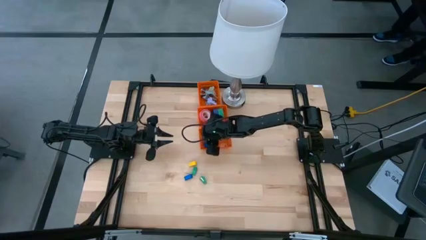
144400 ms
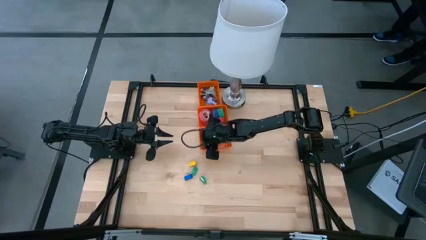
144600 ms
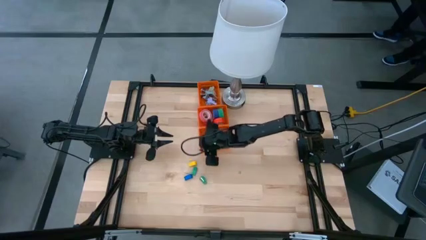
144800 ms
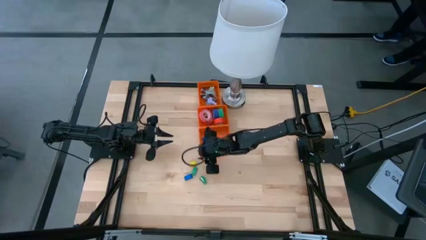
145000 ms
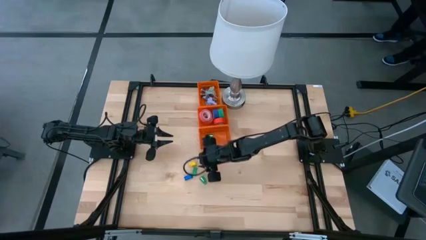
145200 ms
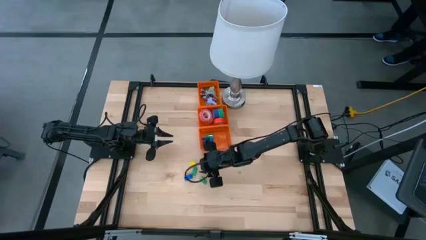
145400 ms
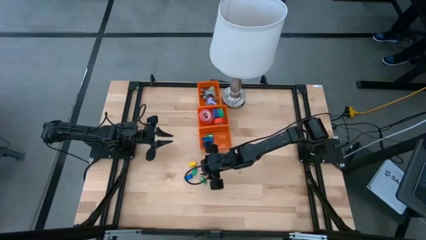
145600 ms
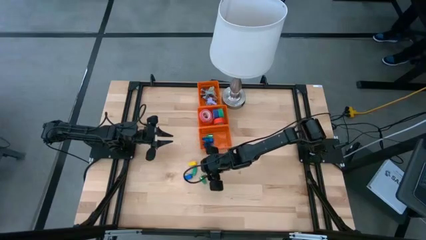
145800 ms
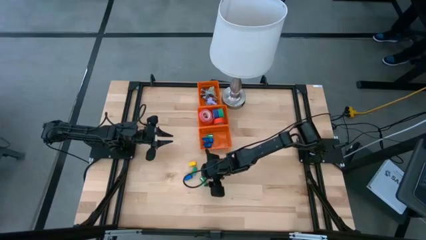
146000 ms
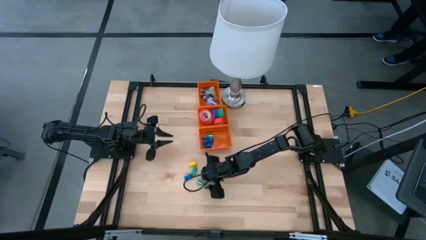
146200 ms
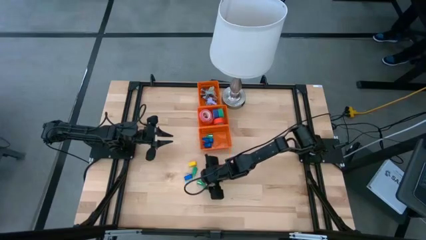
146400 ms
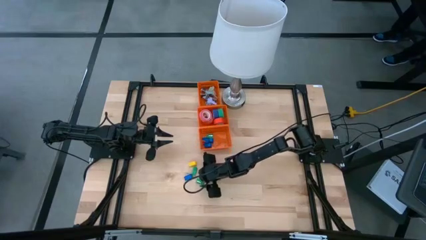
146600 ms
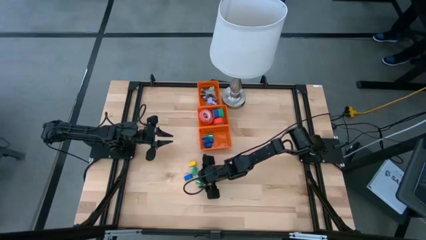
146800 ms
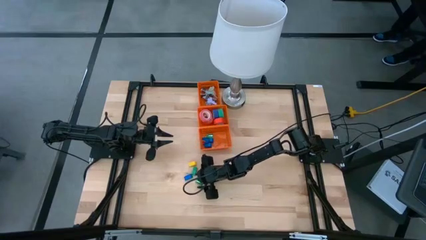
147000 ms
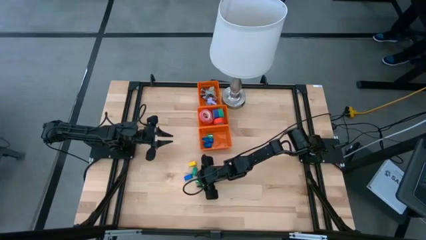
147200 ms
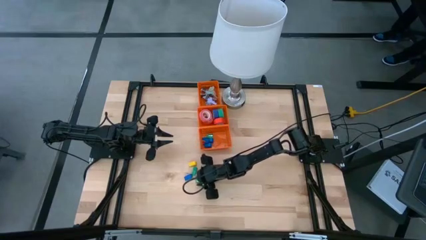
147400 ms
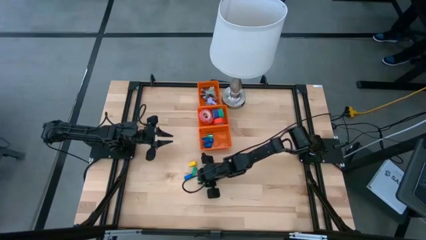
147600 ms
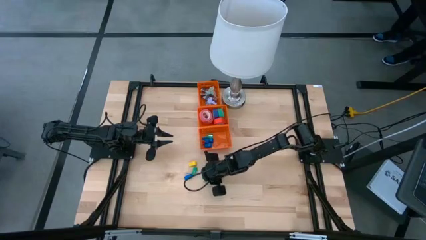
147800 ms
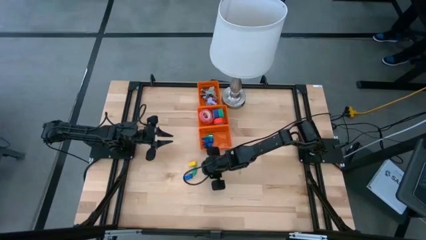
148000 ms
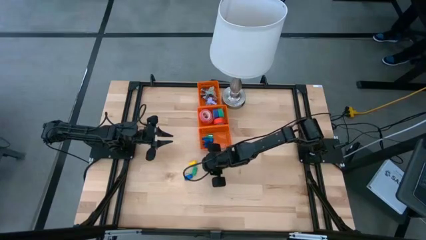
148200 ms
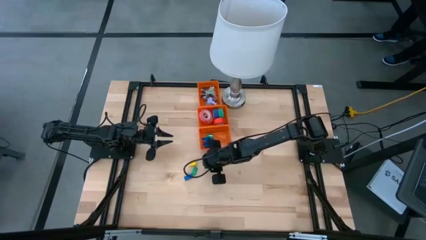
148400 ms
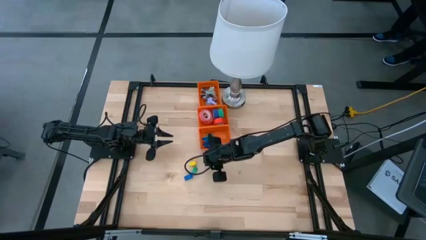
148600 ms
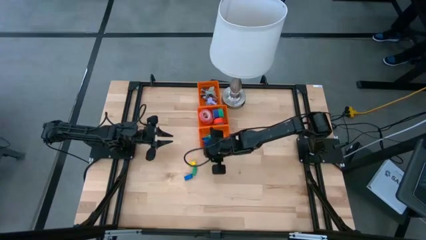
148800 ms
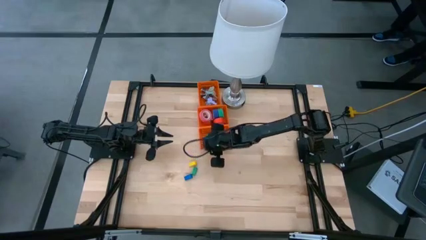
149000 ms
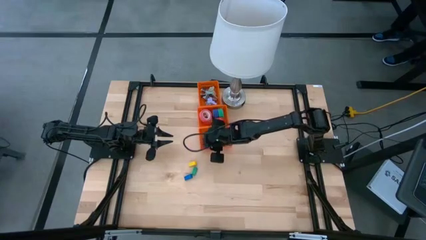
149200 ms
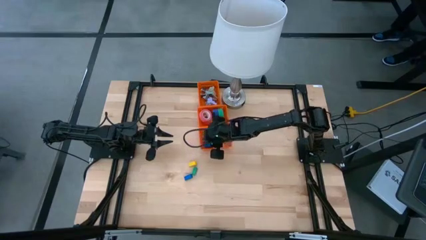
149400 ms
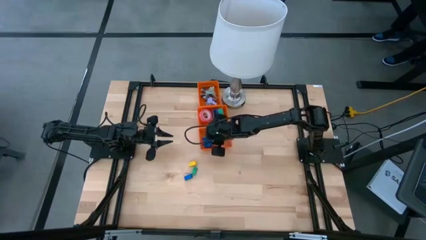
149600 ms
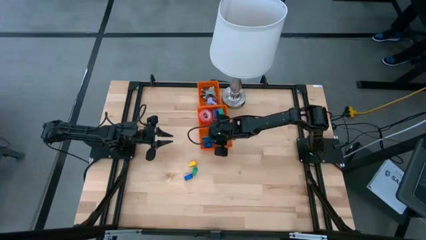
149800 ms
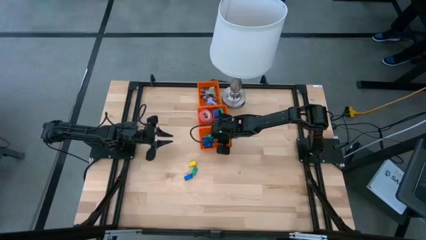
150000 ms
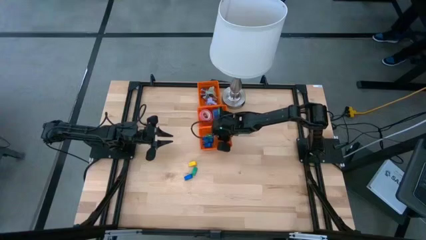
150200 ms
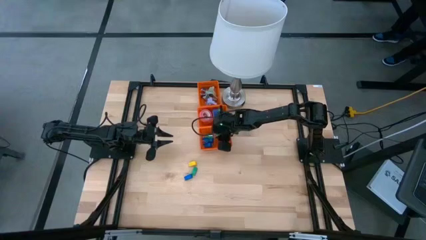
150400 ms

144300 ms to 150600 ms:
Task: Pick and place Stapler, Stapler remover, tape
Put the green stapler into the bottom orange basket

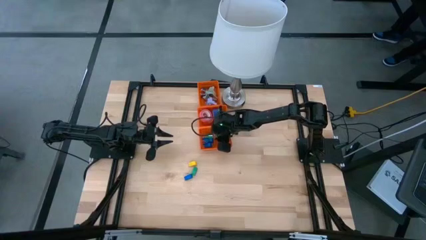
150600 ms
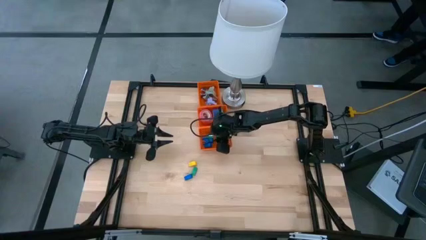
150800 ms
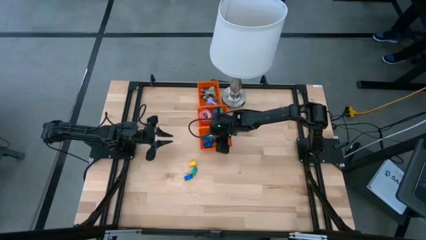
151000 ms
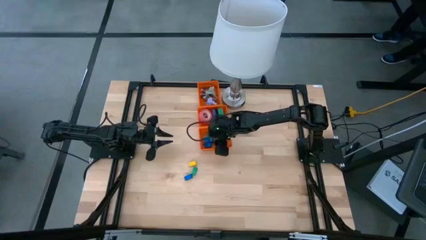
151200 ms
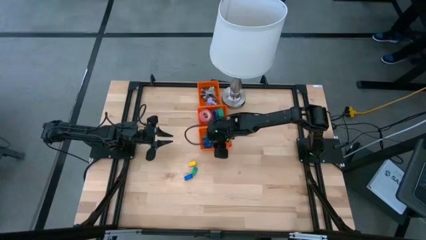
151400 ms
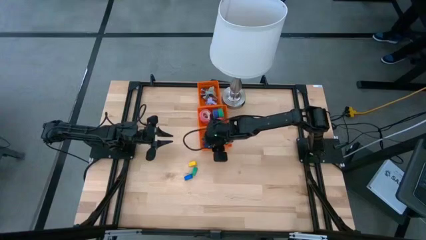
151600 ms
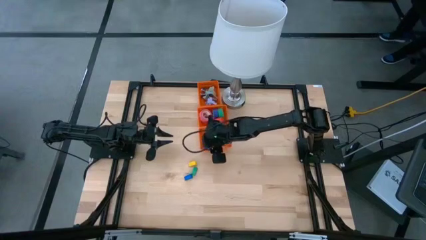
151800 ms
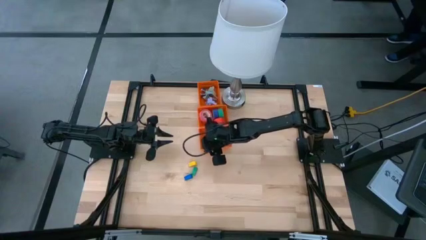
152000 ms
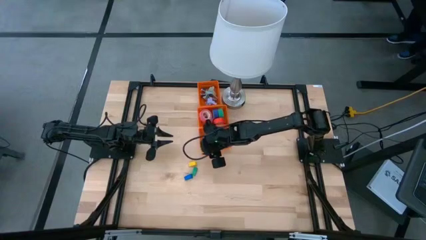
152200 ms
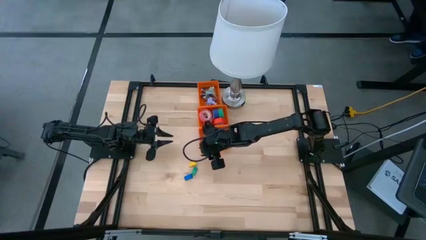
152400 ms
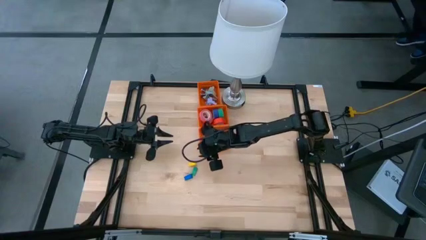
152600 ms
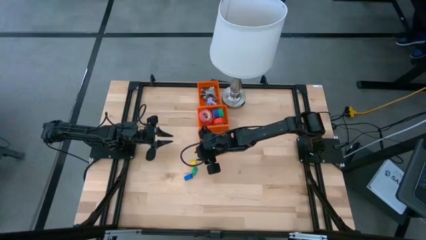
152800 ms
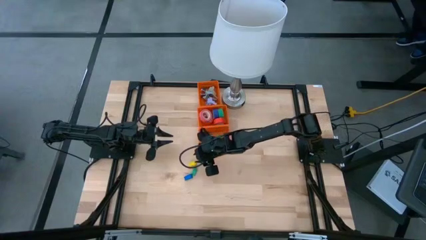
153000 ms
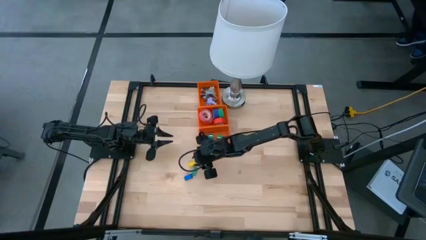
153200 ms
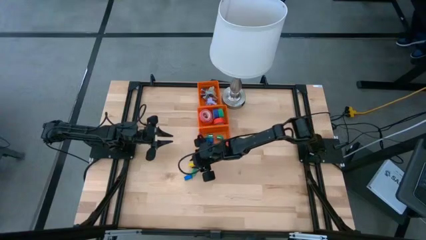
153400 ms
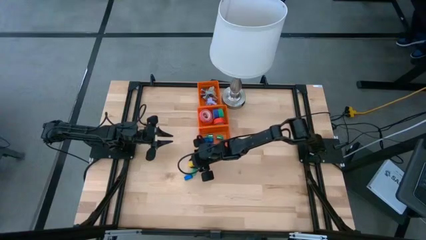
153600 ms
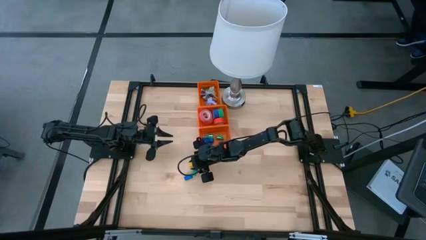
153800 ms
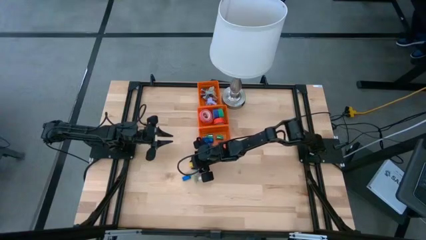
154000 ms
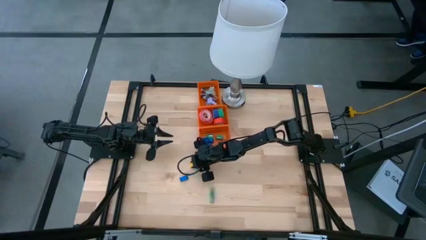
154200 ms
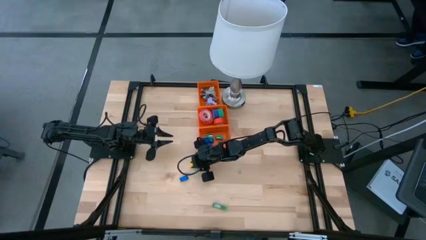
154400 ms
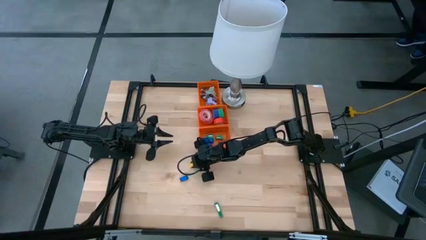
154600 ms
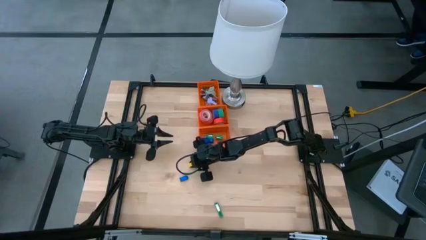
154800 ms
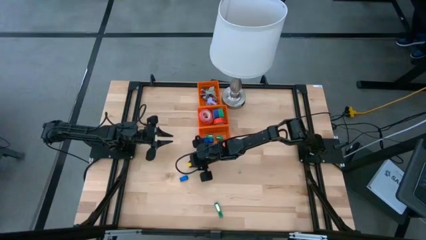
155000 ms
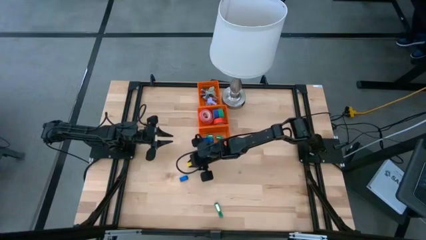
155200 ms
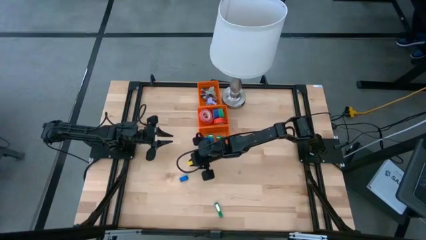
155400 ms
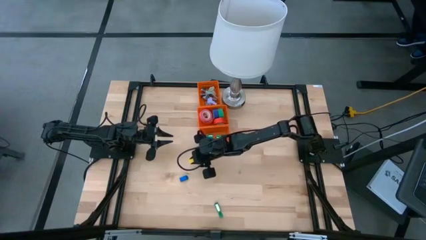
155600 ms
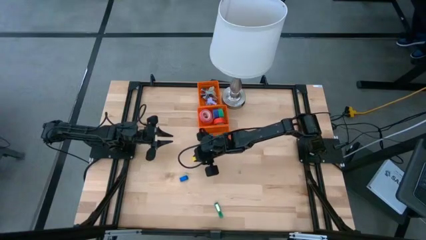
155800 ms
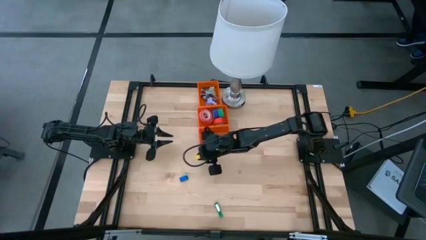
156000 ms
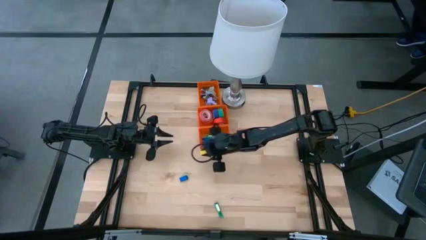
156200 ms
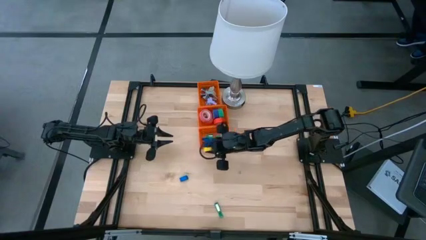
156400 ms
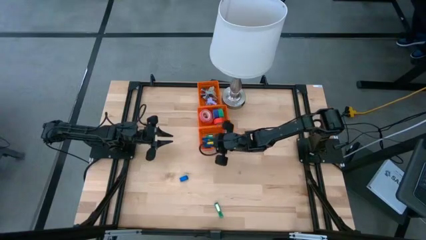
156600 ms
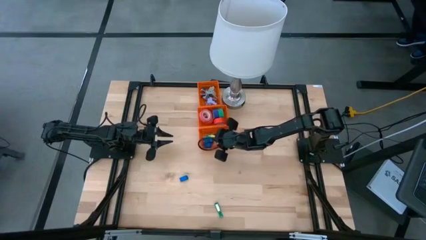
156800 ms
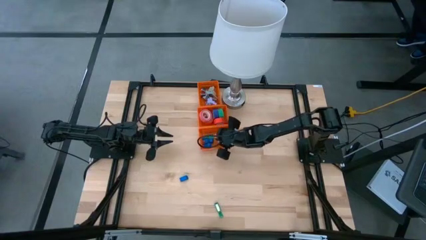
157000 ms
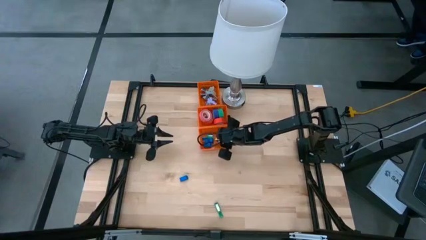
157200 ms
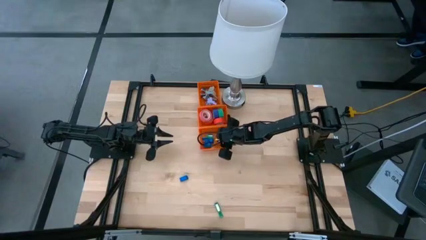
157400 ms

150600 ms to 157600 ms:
Put the yellow stapler into the bottom orange basket

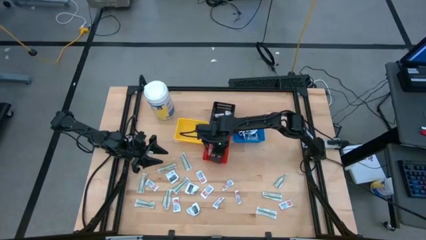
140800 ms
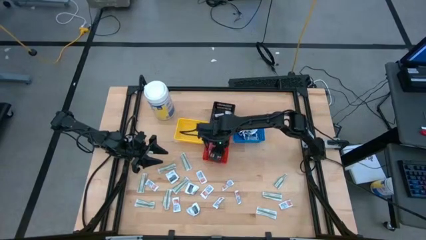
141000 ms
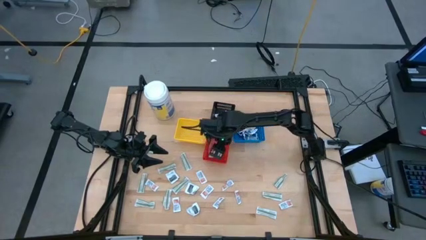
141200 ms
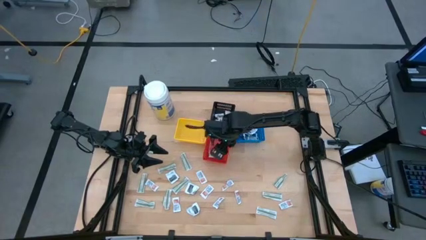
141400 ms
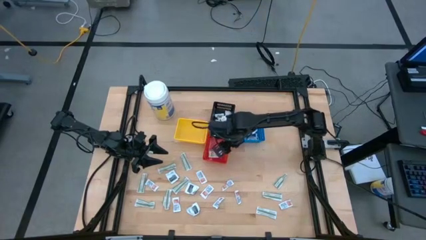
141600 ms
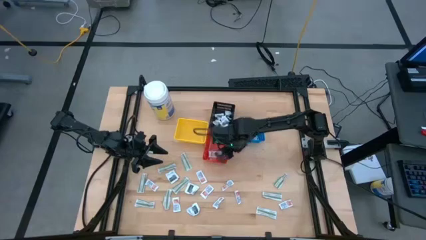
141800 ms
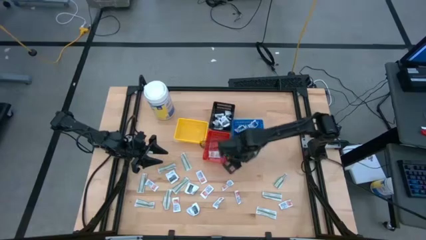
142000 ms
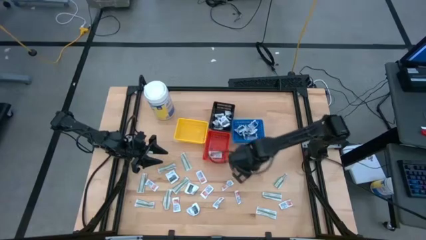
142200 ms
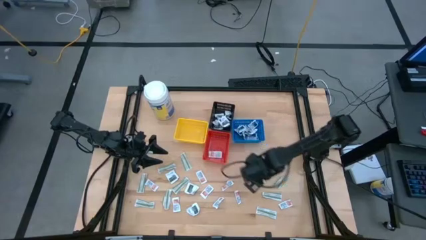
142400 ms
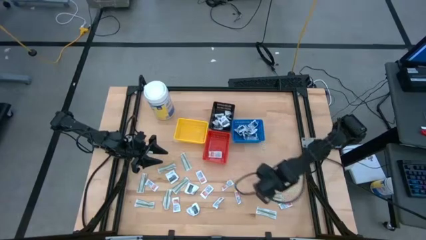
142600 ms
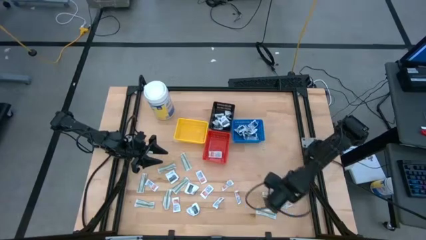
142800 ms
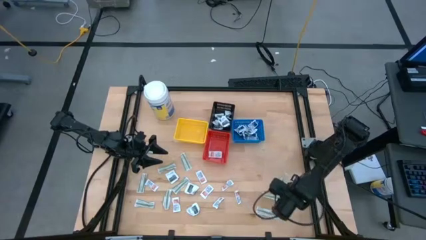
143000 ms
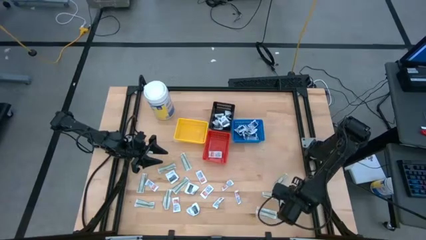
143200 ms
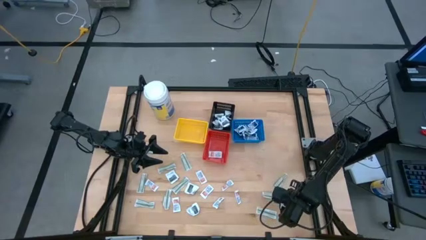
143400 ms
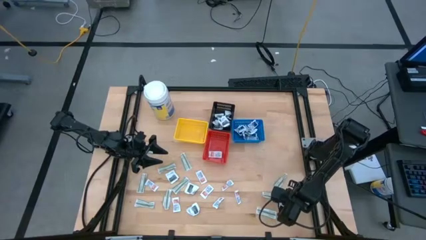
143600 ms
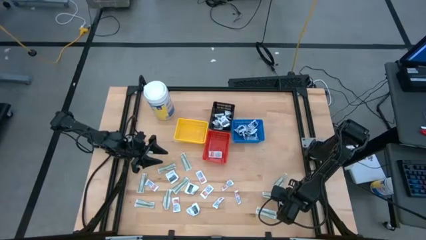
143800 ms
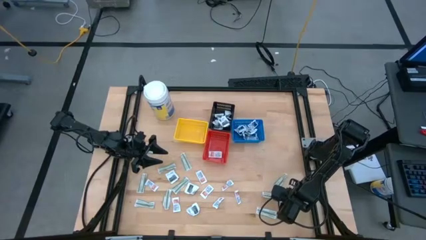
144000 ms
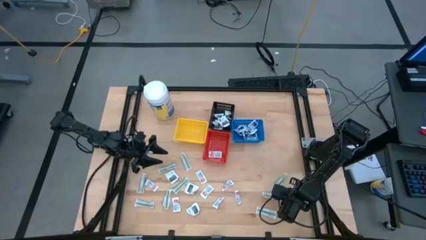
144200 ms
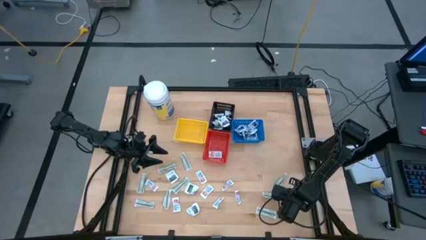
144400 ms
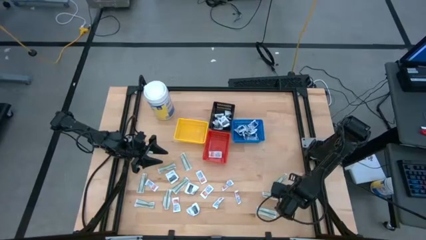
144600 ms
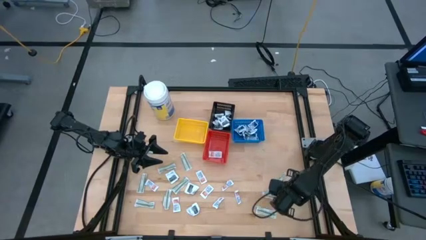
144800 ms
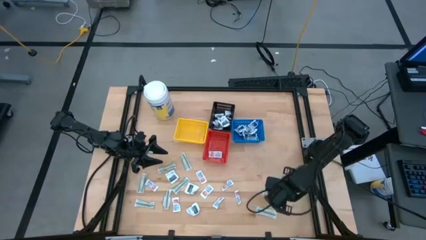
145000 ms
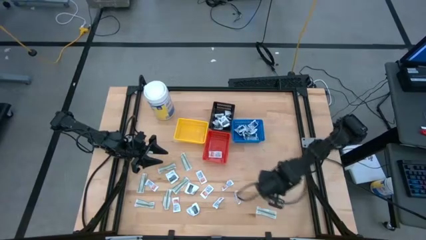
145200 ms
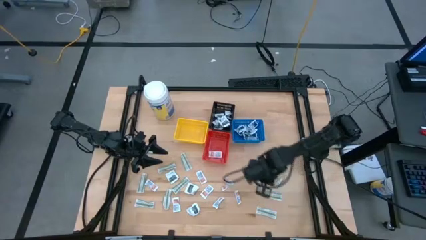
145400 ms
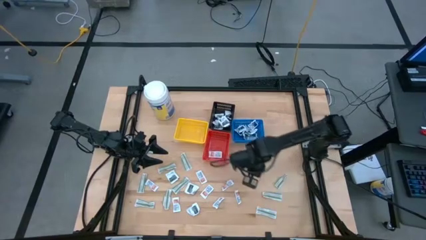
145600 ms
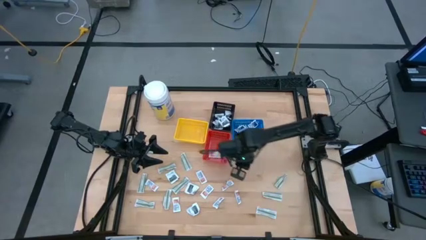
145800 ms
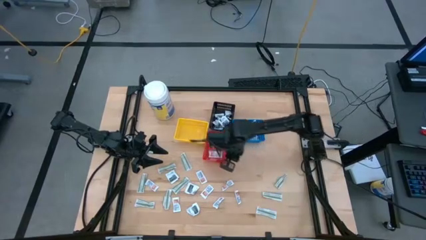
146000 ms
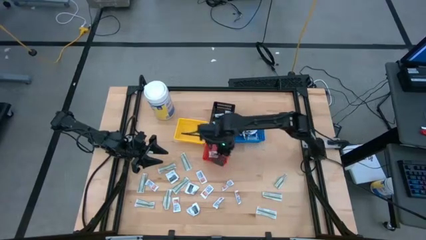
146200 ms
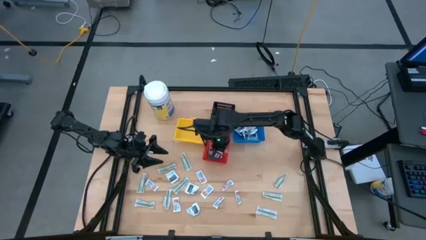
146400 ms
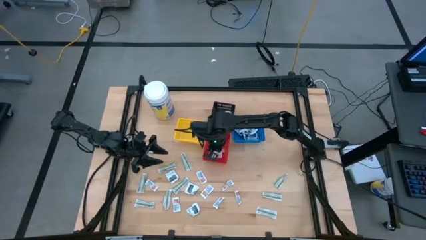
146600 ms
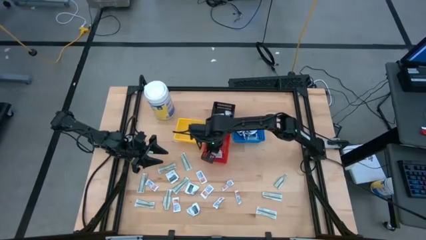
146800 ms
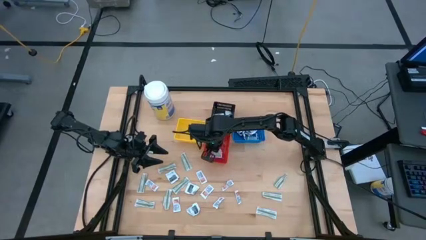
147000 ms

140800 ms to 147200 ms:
Task: Pick & Place First Aid Supplies
Put the ointment pack into the red bin
